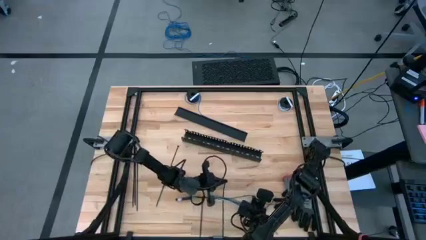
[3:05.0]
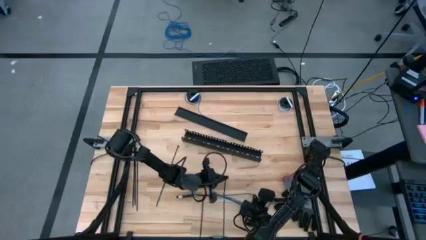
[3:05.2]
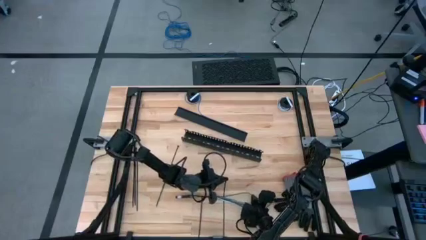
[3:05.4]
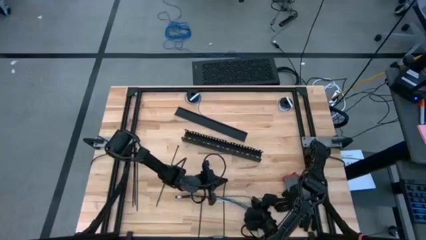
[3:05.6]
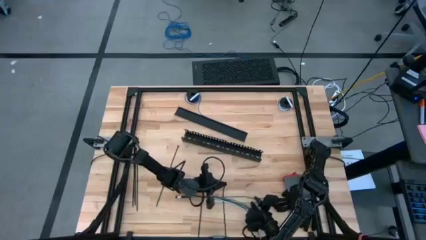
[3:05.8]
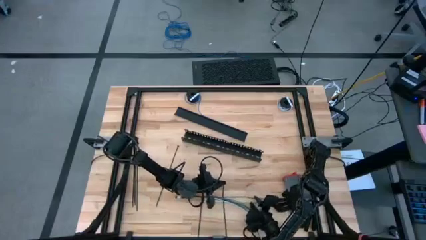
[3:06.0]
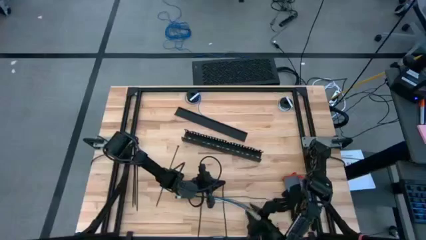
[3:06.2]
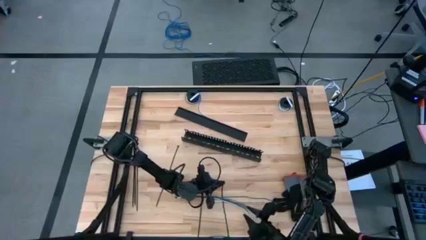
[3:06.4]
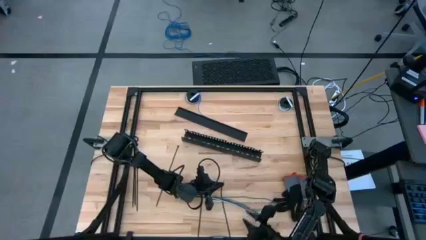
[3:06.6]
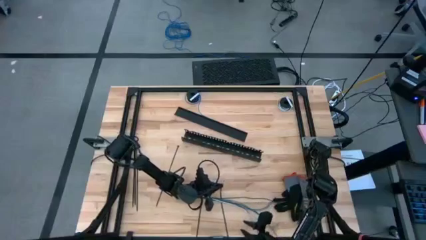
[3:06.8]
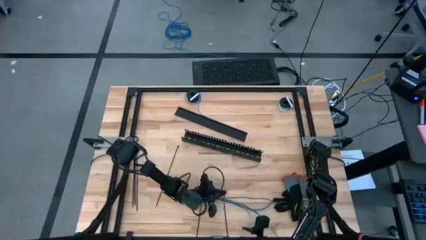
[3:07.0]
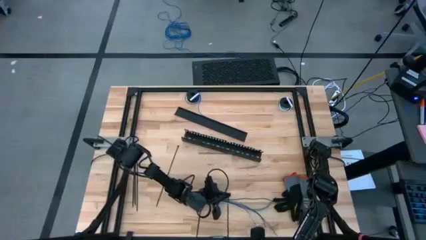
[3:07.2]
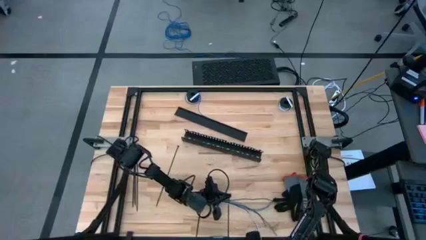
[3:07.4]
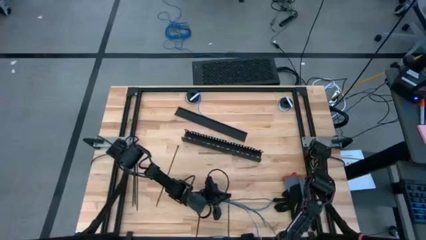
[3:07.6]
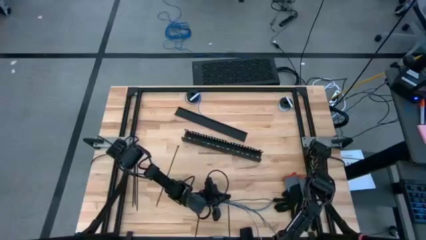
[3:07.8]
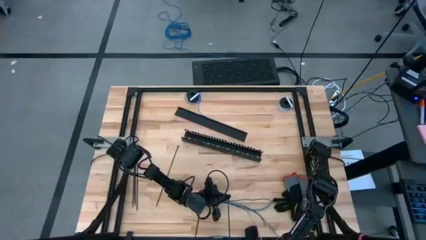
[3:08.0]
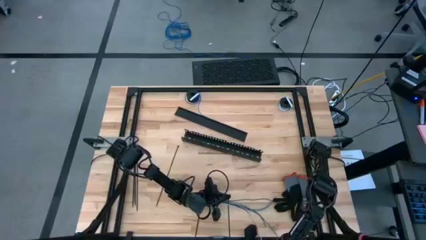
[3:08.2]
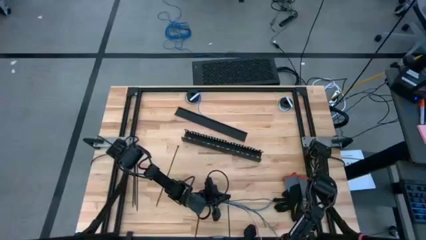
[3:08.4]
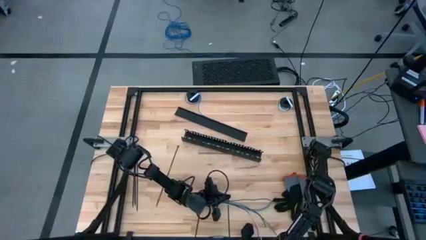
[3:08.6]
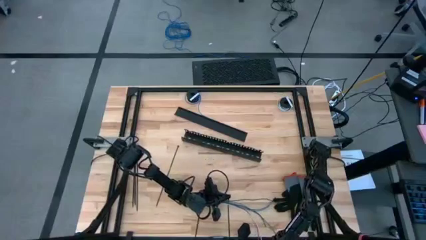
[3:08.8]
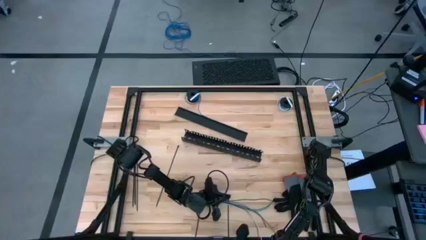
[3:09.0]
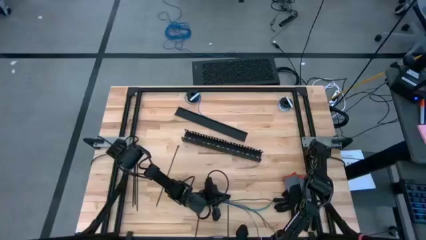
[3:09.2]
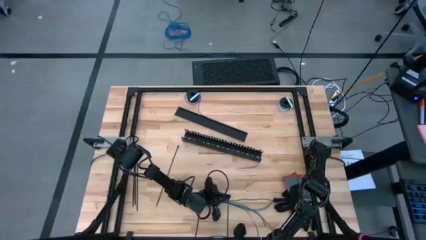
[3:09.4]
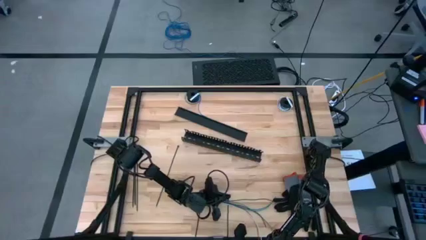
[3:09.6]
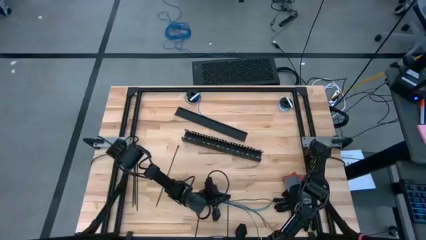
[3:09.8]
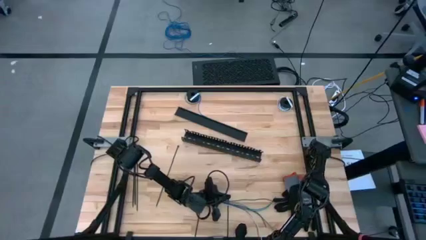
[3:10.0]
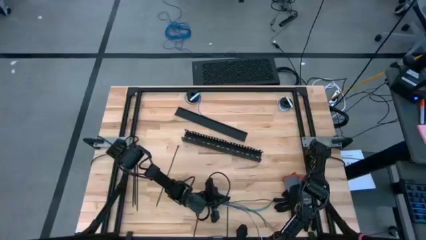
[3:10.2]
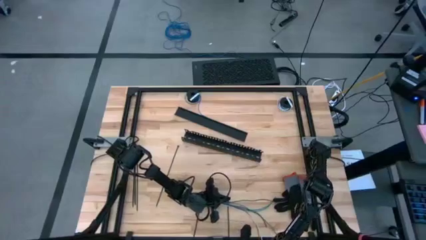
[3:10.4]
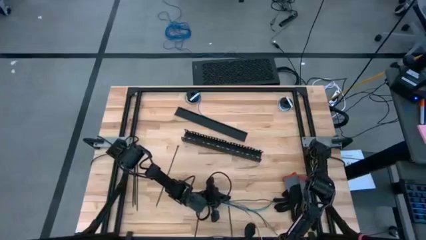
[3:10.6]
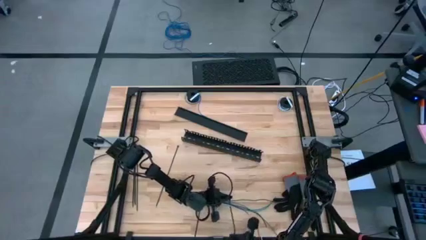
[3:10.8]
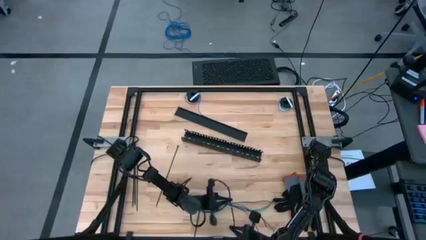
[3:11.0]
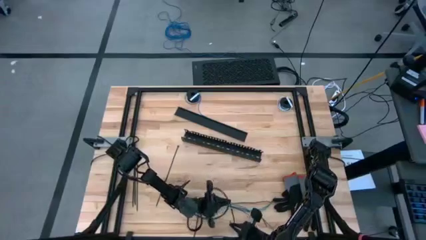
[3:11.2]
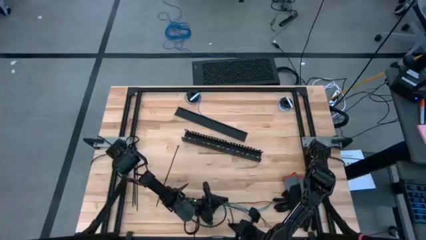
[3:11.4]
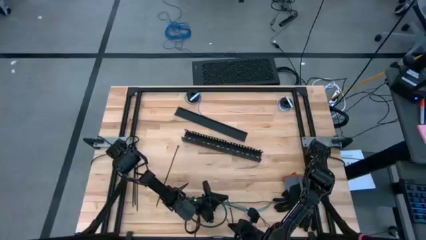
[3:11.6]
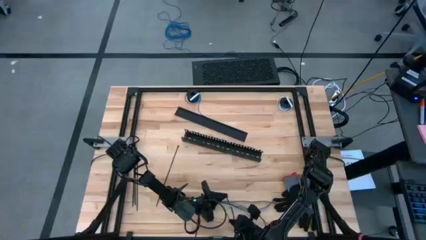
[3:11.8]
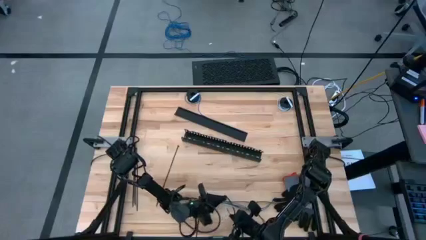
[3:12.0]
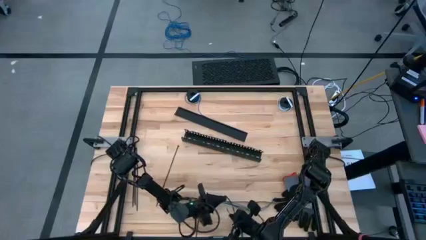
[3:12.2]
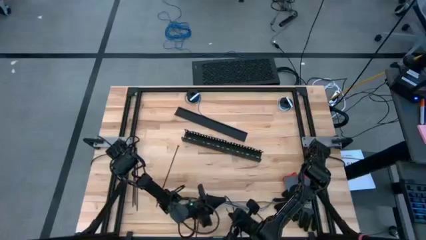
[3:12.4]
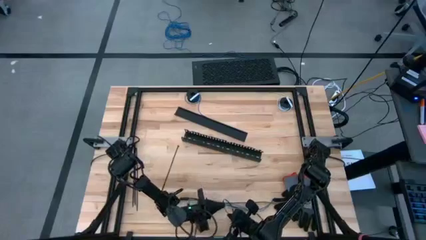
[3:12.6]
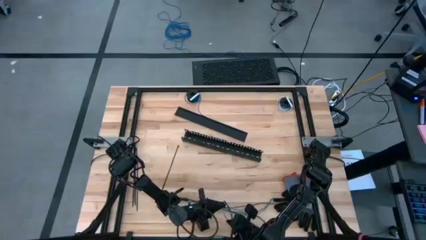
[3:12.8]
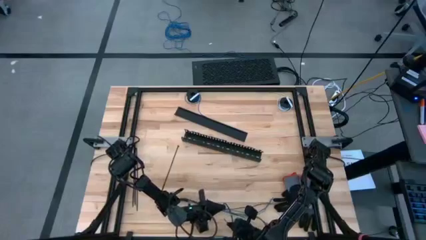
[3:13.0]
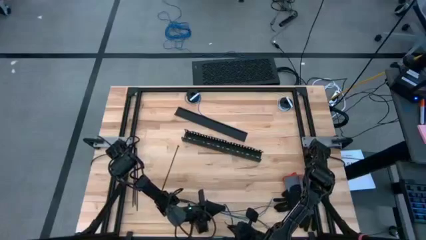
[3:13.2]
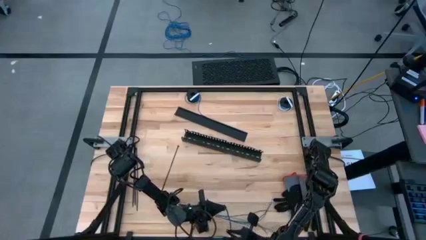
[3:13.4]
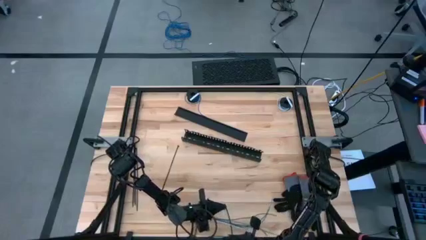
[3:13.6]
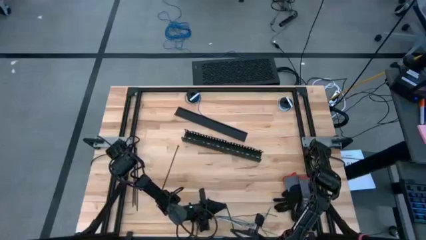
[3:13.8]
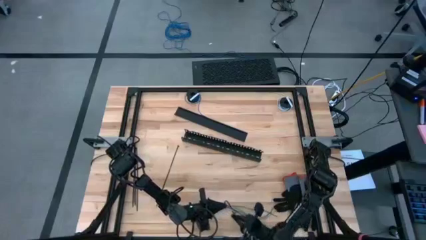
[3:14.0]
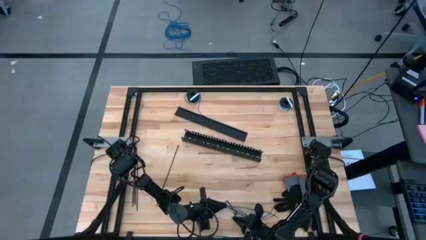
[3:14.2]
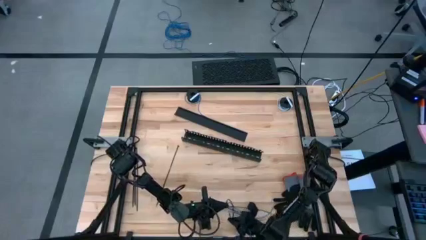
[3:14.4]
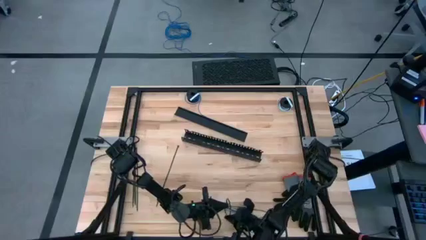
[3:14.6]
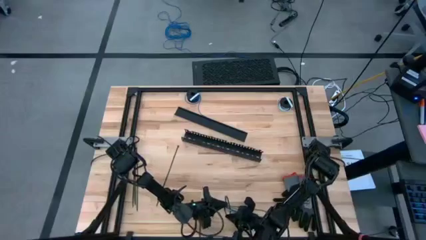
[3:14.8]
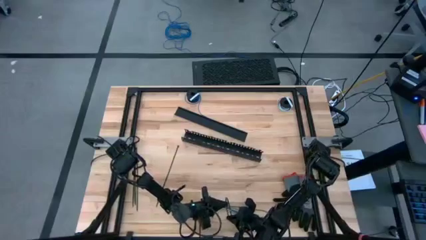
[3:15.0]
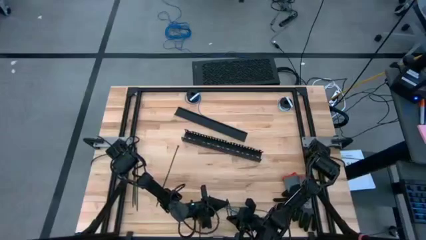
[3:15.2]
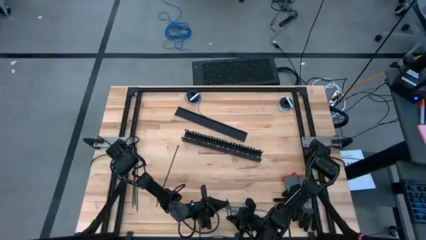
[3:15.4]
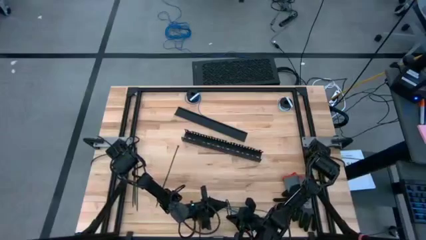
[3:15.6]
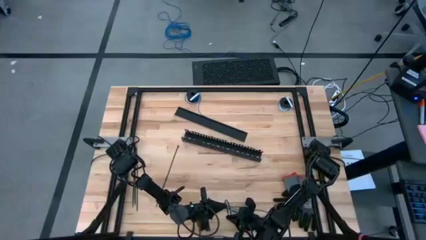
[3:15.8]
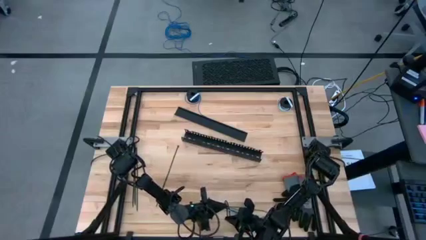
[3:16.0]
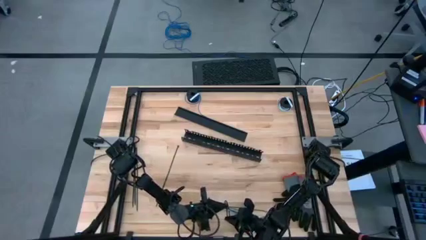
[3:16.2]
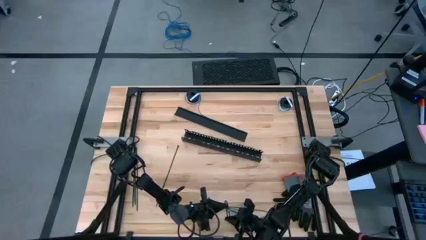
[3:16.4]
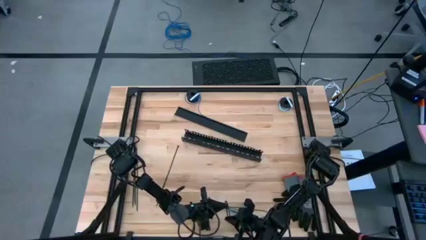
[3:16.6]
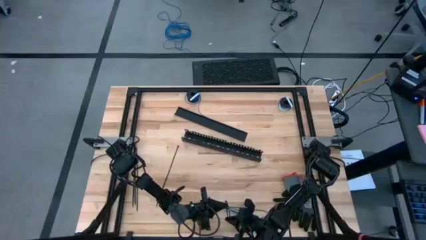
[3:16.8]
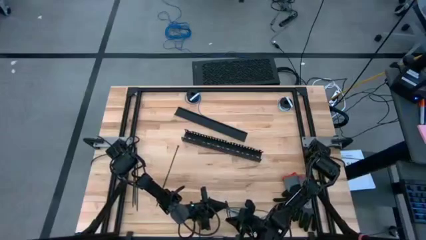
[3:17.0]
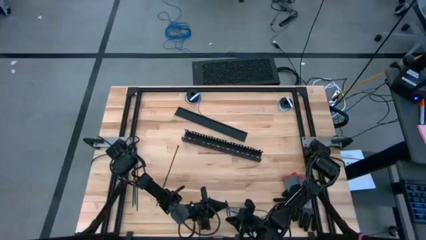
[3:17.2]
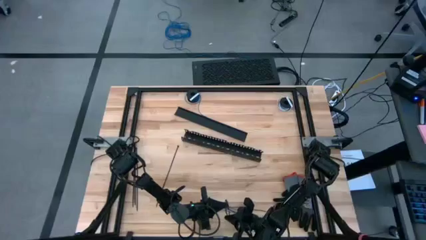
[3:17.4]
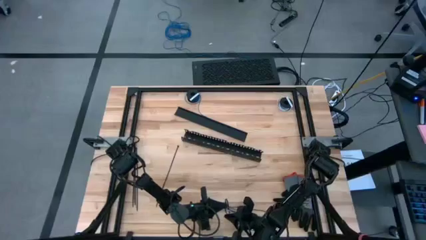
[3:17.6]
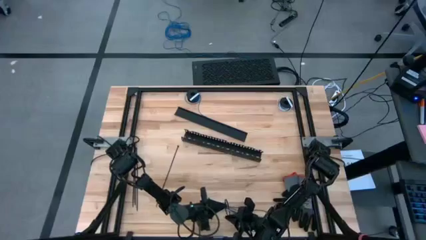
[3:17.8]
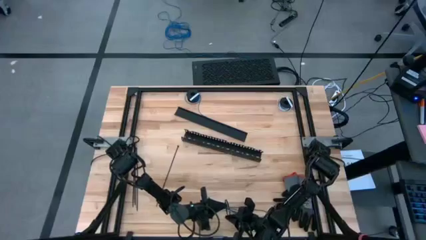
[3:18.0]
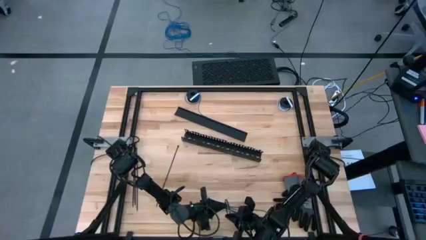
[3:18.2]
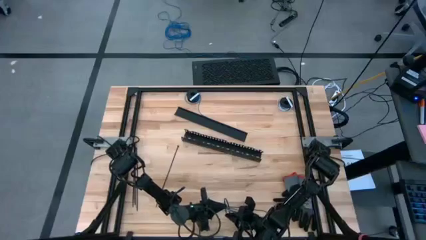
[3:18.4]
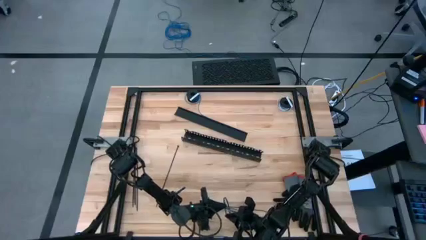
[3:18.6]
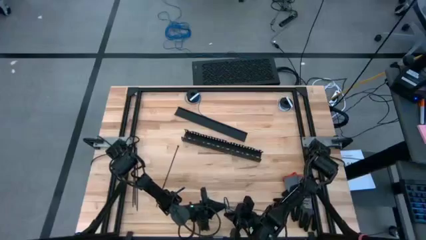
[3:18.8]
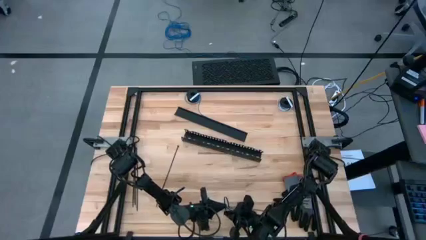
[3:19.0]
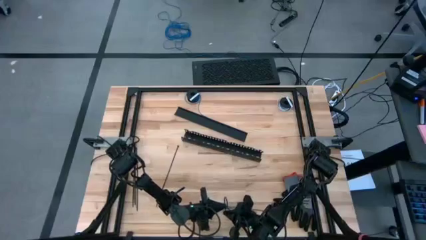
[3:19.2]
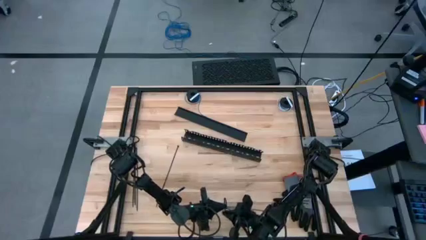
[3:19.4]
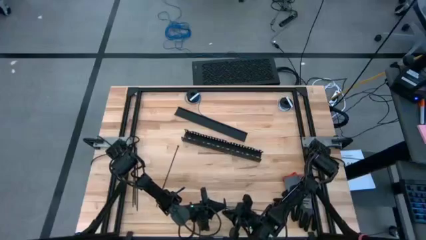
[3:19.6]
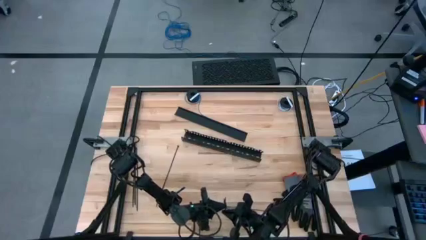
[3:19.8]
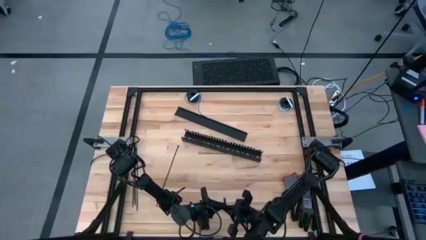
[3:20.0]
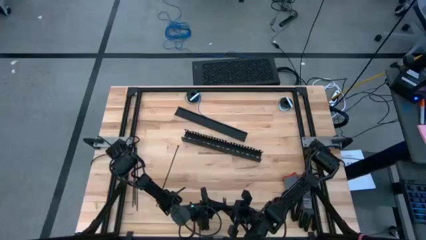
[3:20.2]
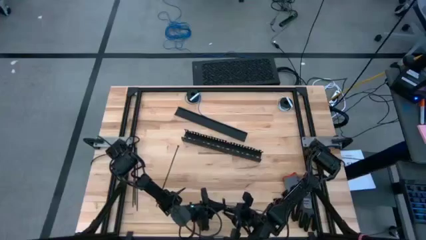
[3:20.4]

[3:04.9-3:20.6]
Task: Ziptie cables
Wrap the cable wires with the black zip tie
